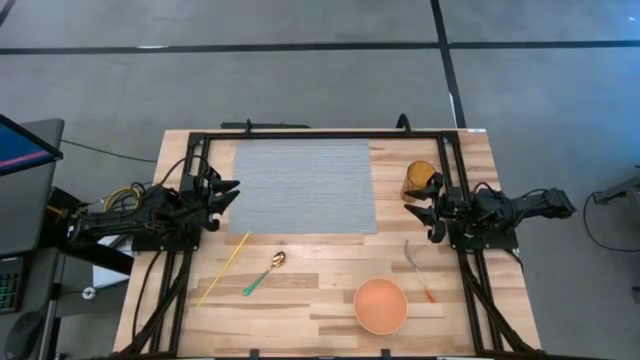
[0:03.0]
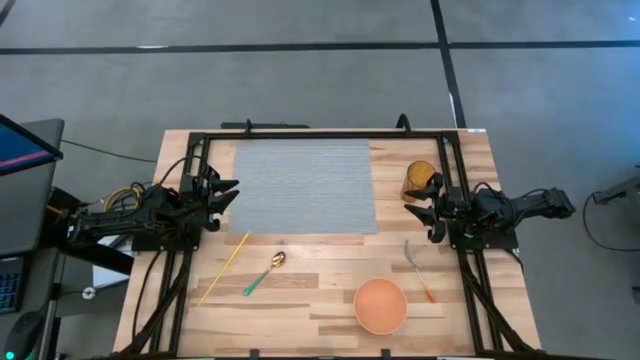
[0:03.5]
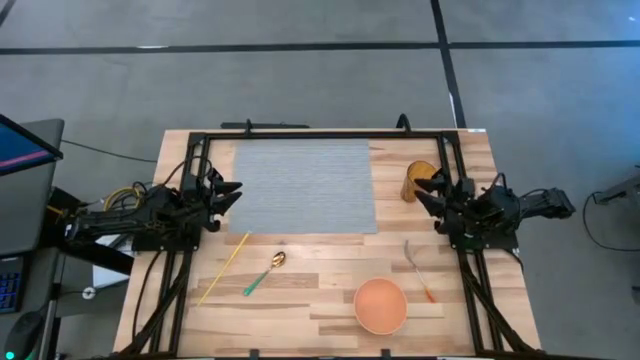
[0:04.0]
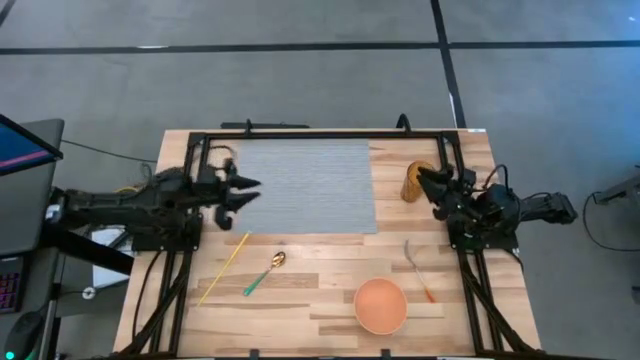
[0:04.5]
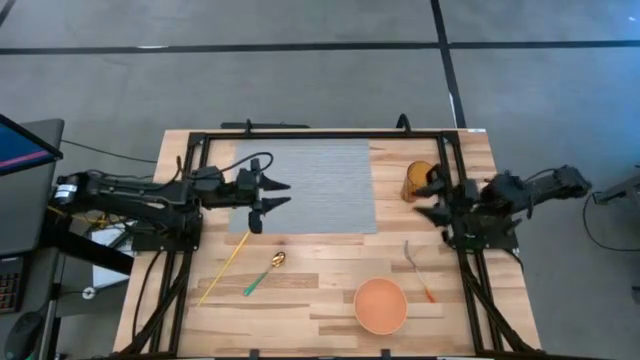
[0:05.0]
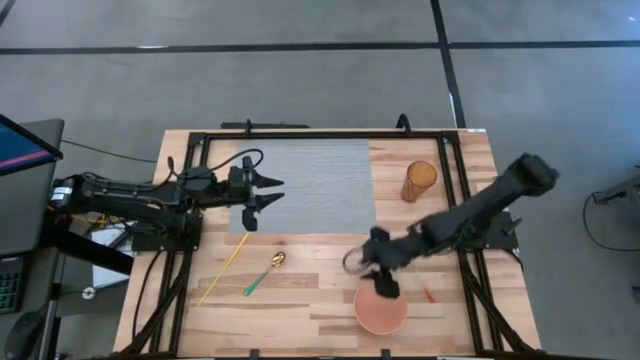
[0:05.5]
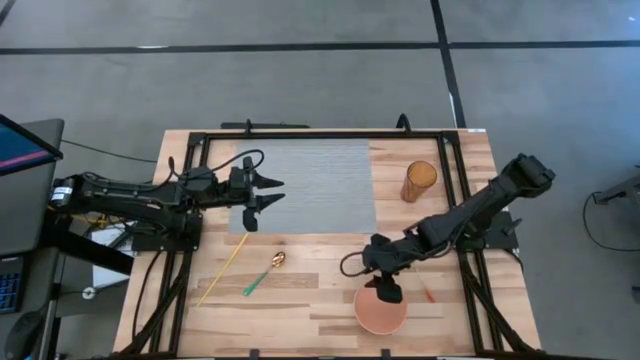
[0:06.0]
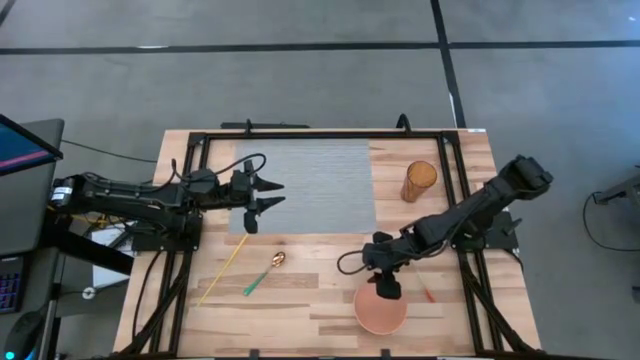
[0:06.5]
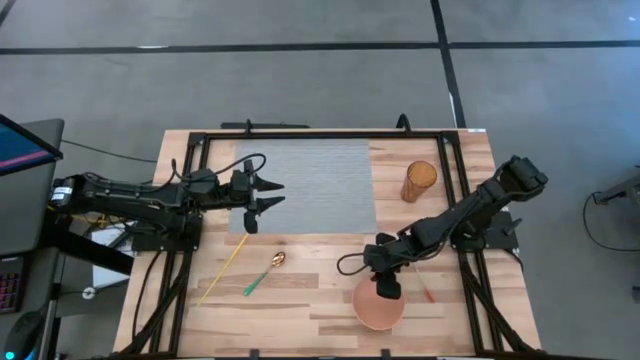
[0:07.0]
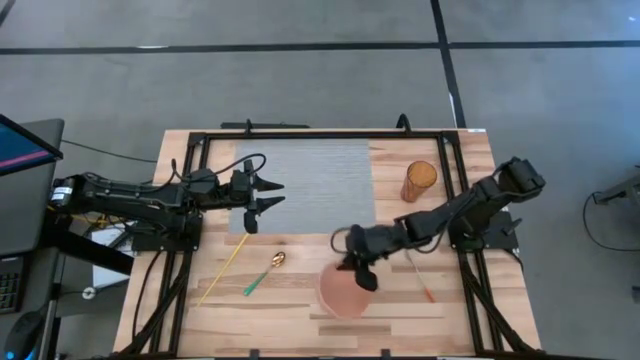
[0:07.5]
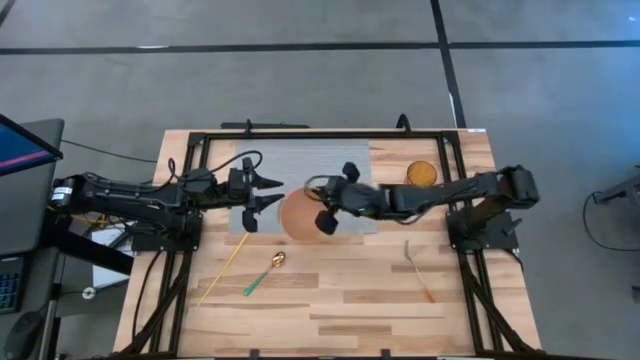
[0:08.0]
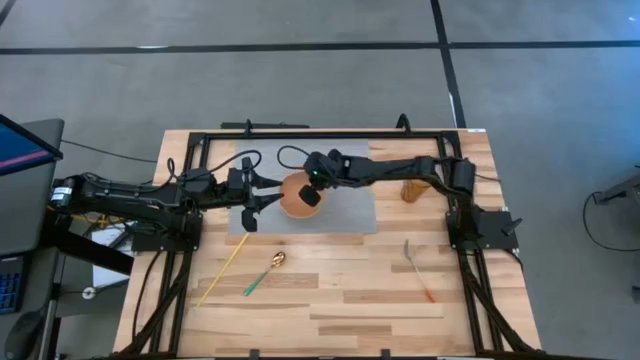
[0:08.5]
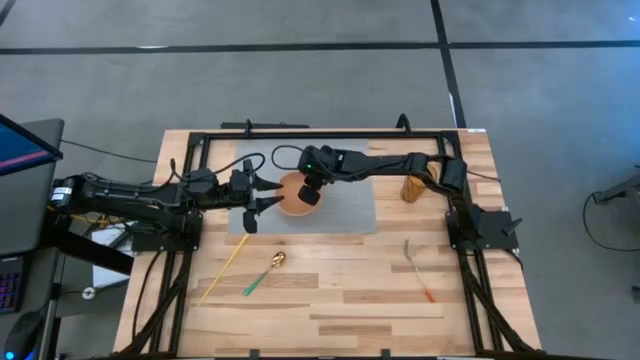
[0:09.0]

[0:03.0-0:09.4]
Task: Pick & Place Utensil
Put the orange bowl on the gray mat

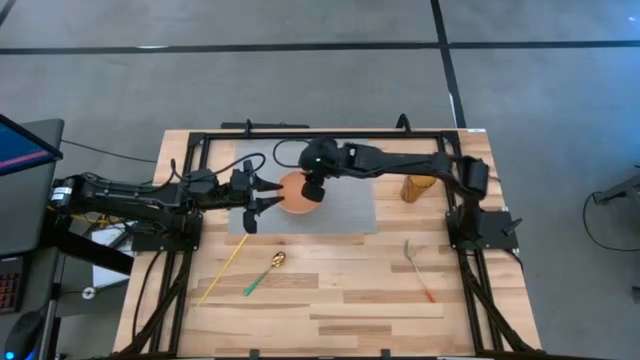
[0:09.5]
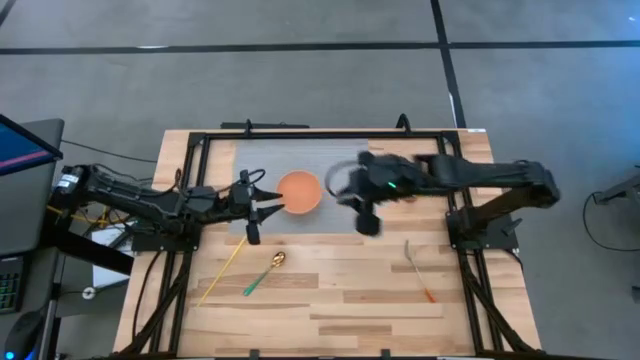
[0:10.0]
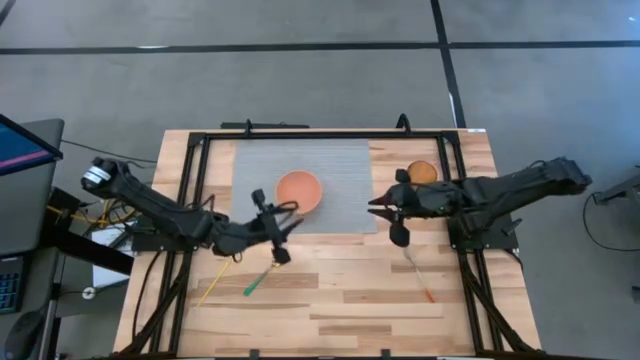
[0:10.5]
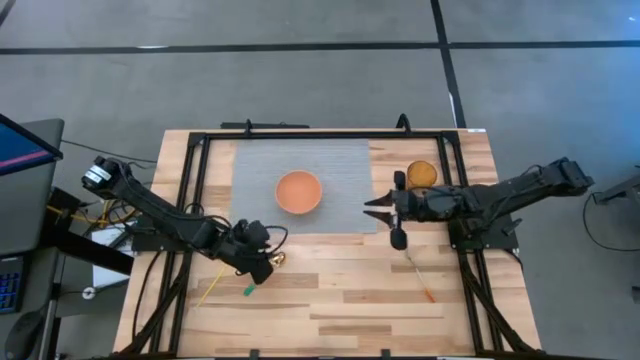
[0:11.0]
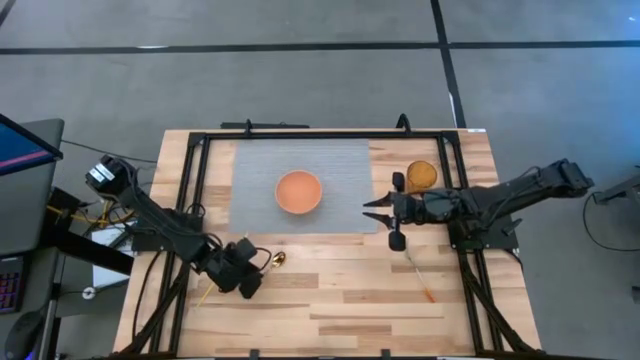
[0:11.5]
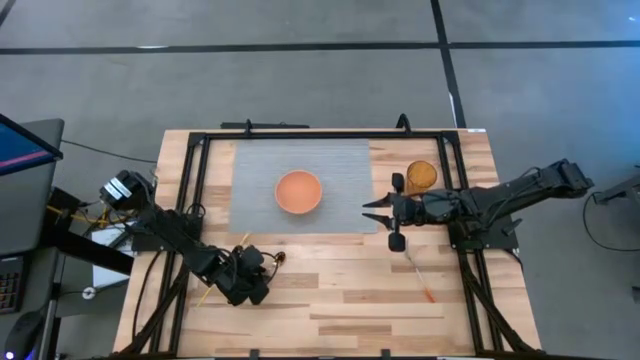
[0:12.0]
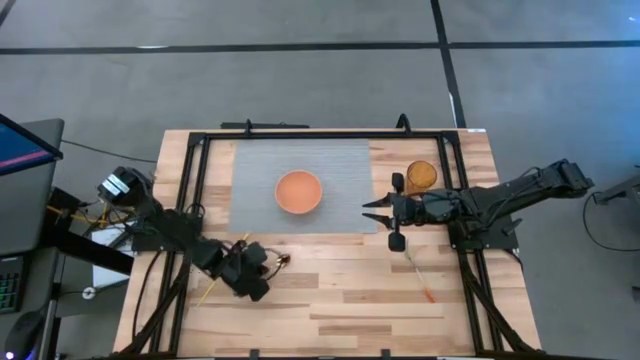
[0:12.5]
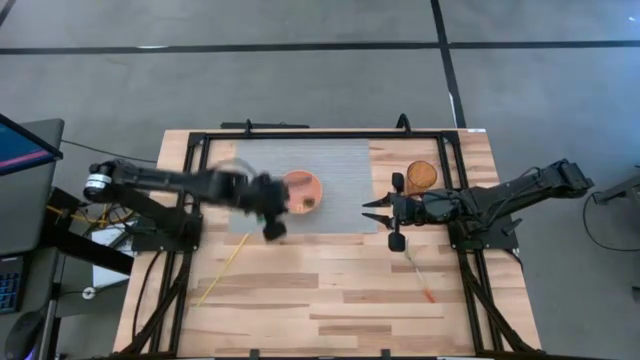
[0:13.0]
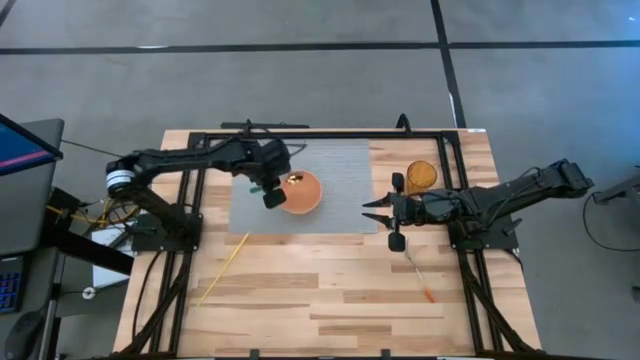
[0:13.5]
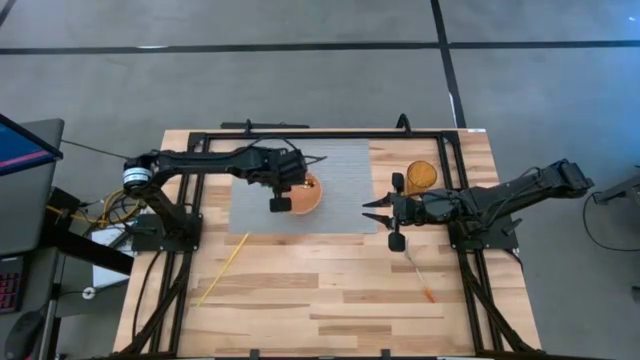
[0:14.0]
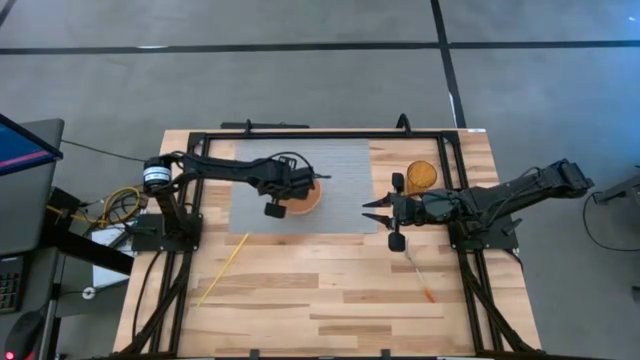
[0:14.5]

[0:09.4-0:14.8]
Put the green spoon into the orange bowl

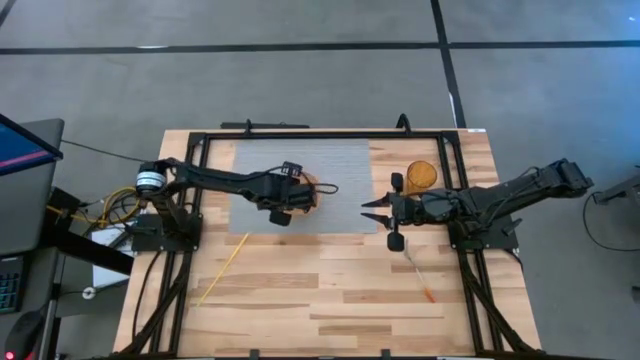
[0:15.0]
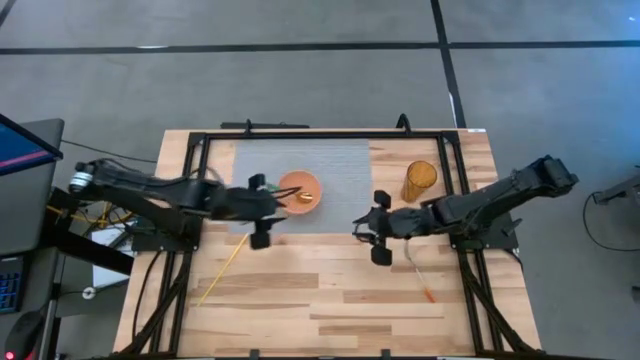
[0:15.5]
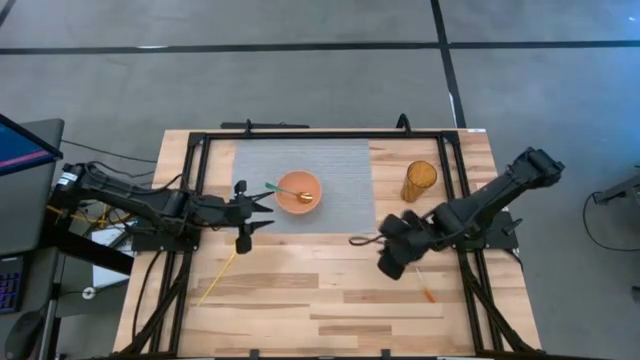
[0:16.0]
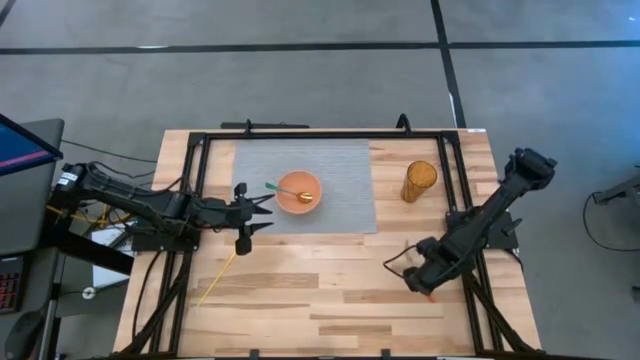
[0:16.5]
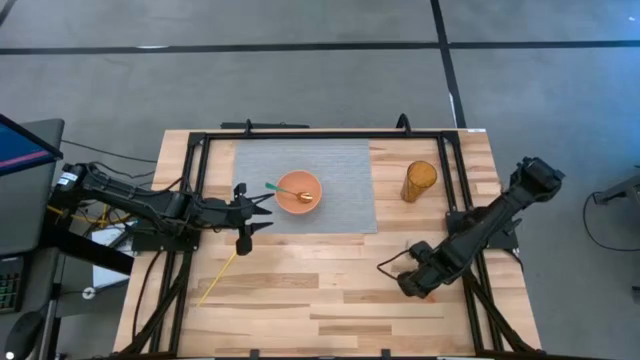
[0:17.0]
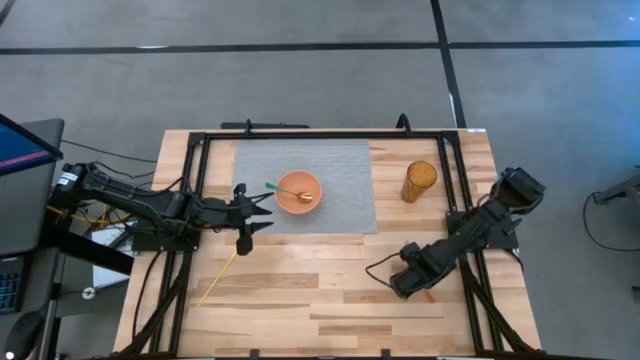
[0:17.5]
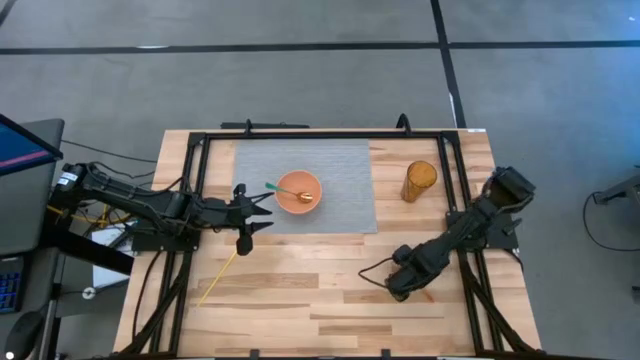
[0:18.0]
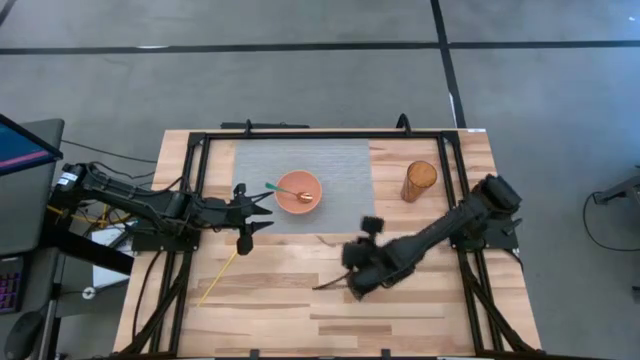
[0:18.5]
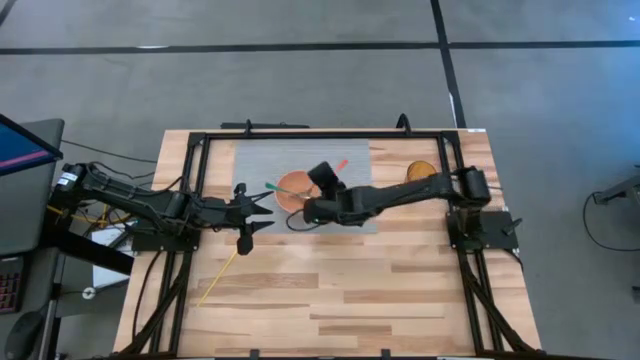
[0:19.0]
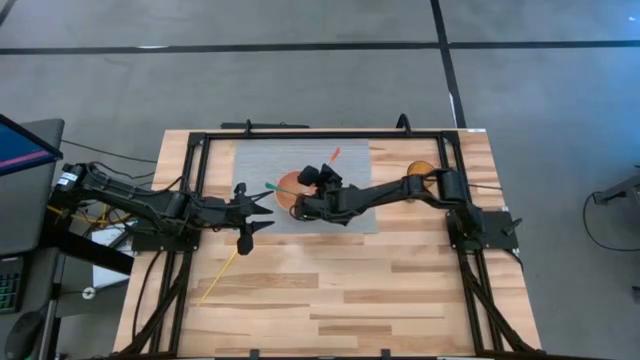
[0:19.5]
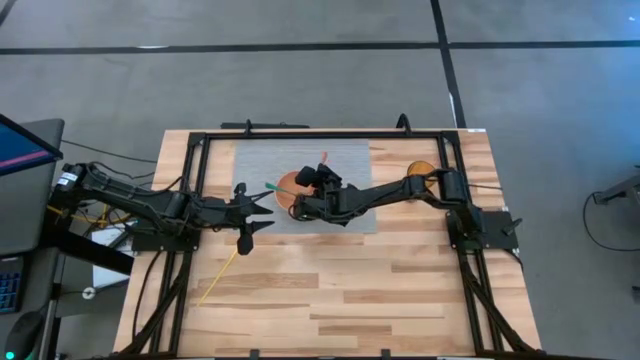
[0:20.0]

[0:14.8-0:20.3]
Put the orange fork into the orange bowl

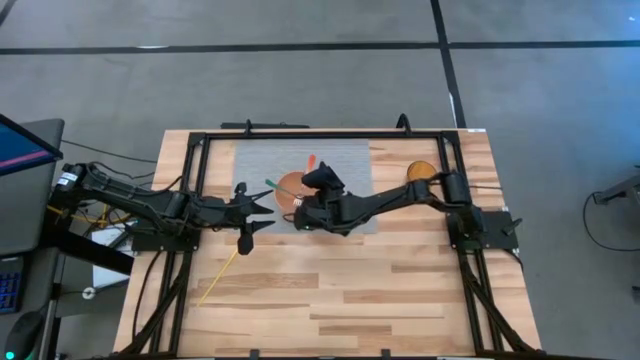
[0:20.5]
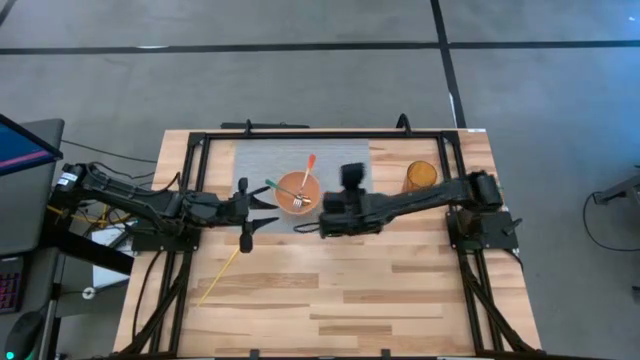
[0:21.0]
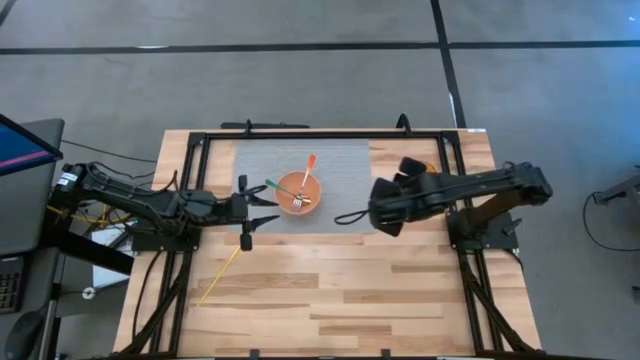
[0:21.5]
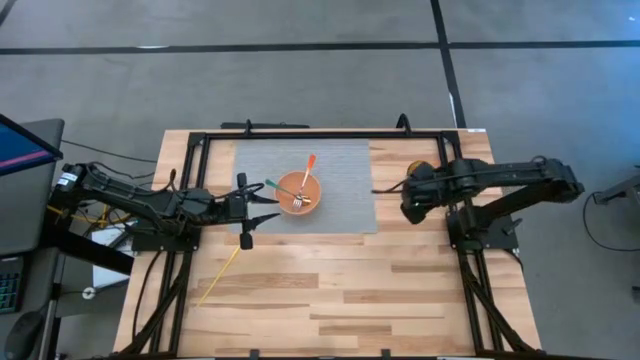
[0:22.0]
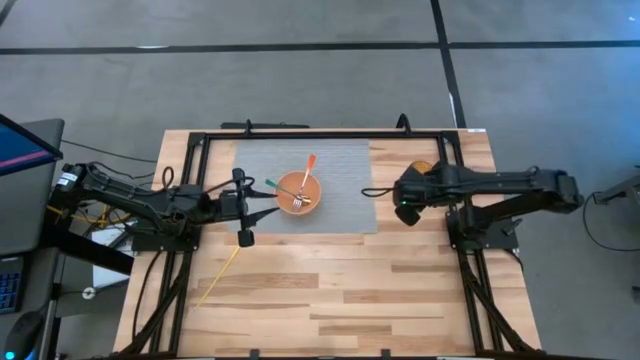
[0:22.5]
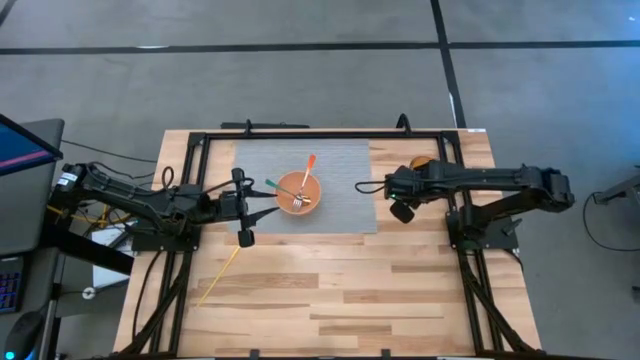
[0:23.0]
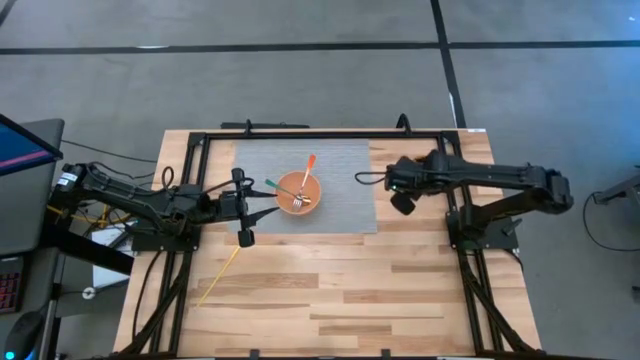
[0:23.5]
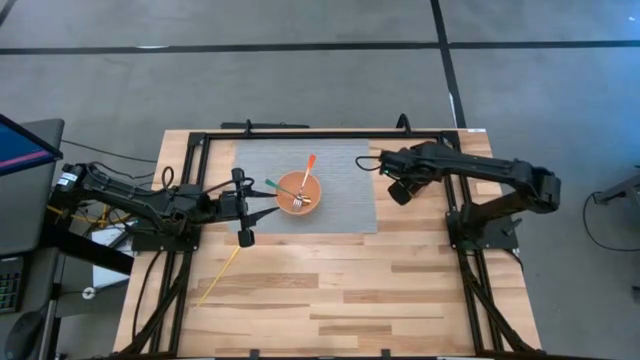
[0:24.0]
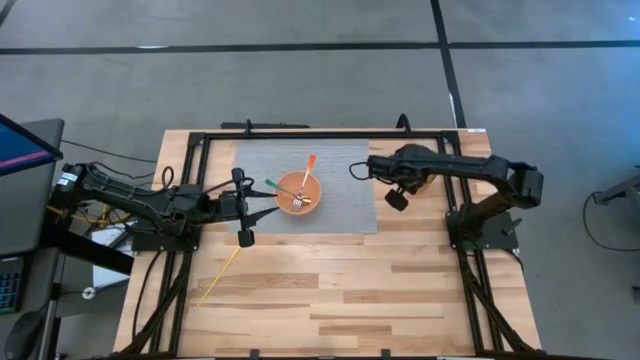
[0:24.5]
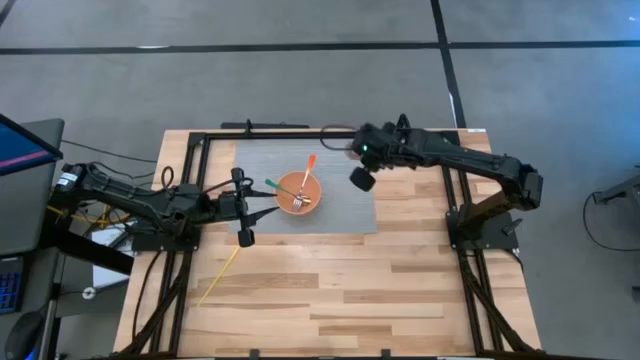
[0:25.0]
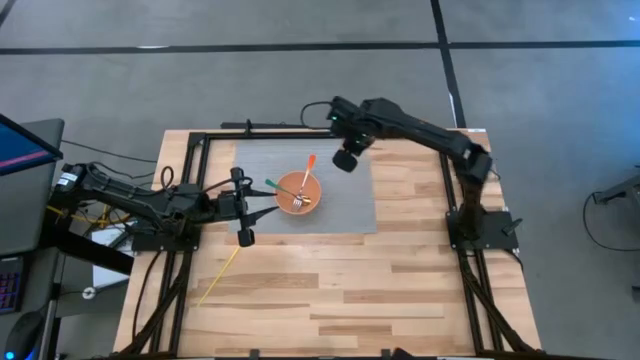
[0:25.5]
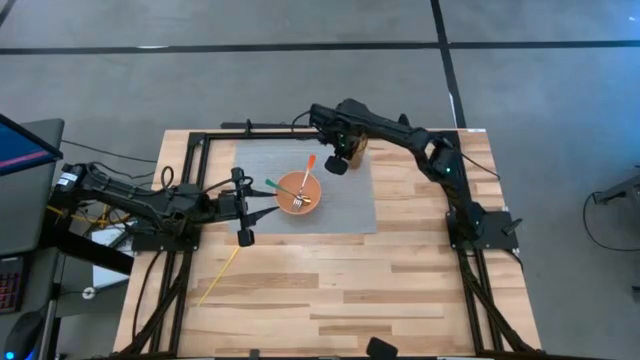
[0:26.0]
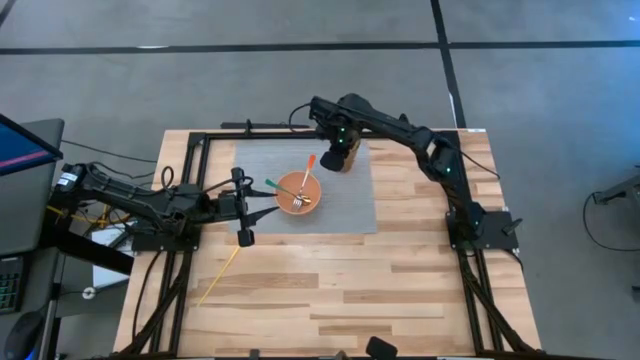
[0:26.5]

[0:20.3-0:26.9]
Put the yellow cup on the gray mat to the top right of the orange bowl
